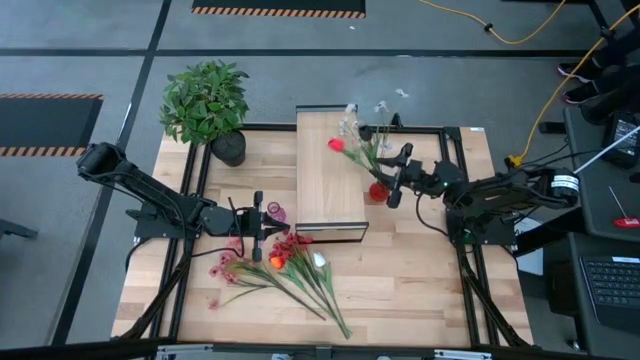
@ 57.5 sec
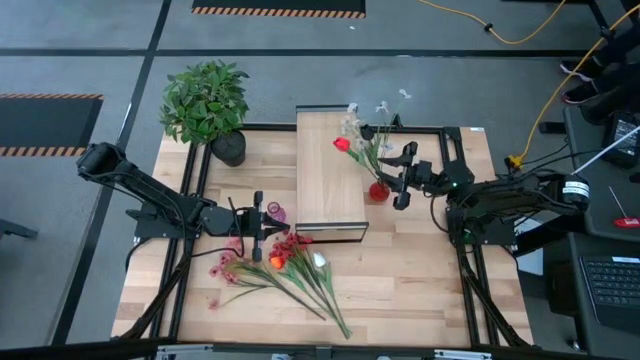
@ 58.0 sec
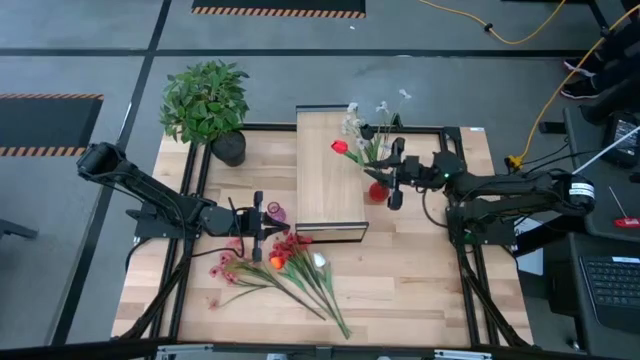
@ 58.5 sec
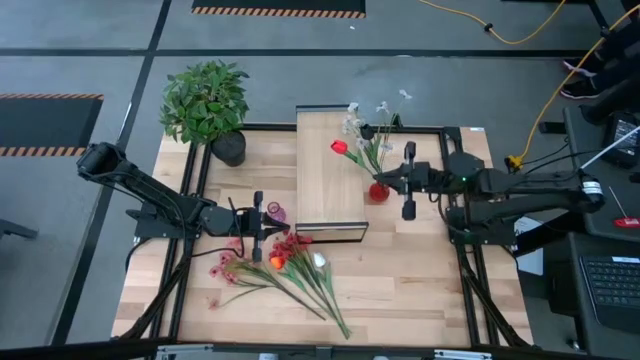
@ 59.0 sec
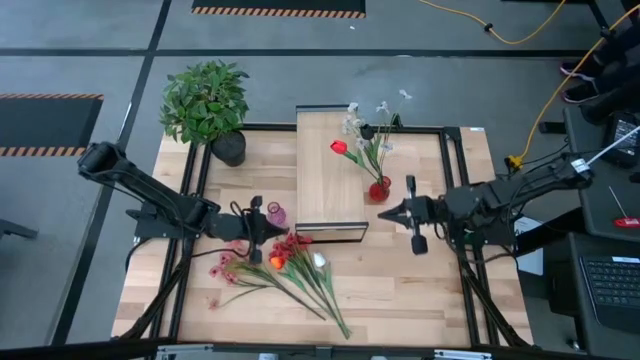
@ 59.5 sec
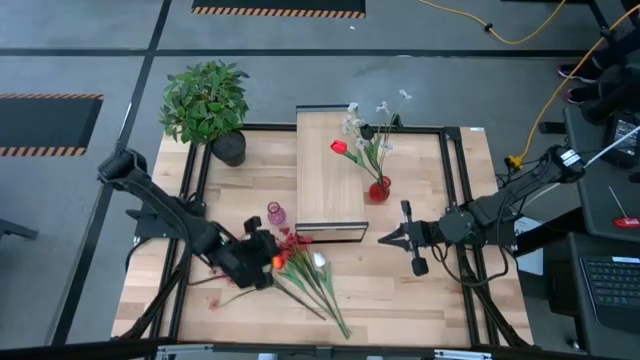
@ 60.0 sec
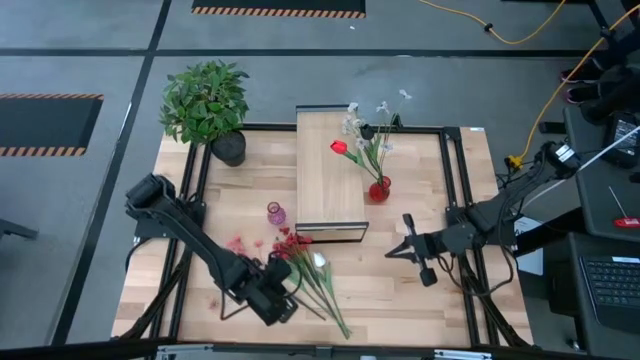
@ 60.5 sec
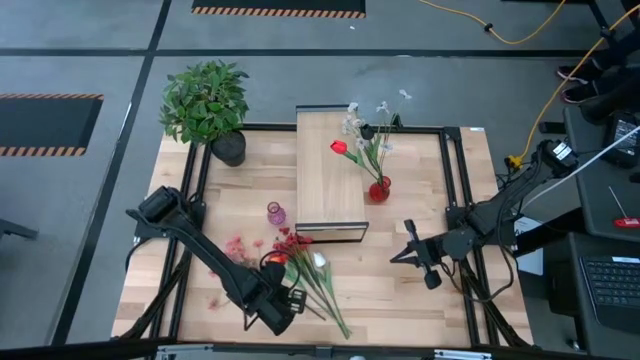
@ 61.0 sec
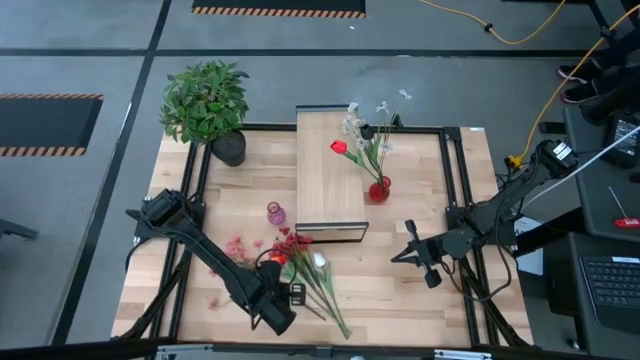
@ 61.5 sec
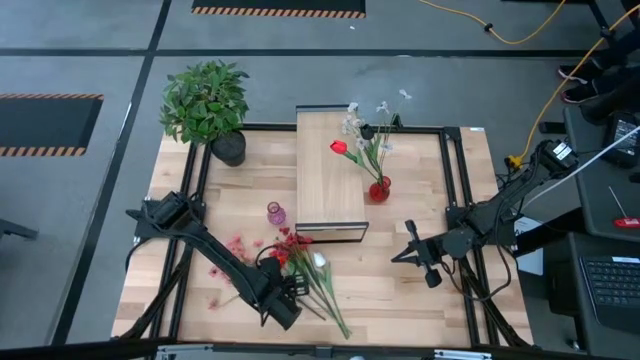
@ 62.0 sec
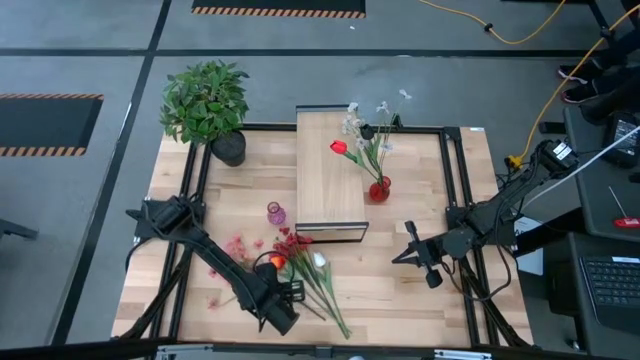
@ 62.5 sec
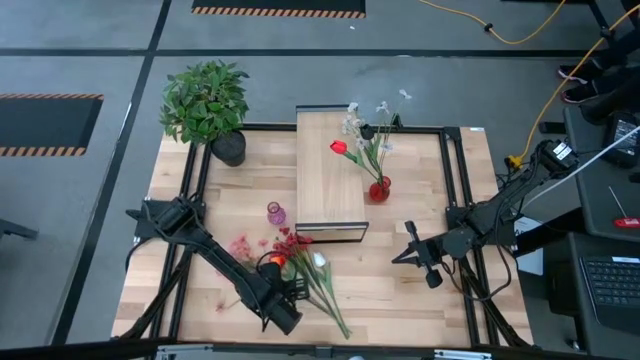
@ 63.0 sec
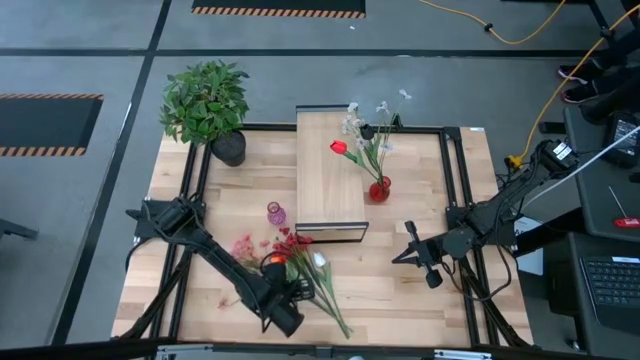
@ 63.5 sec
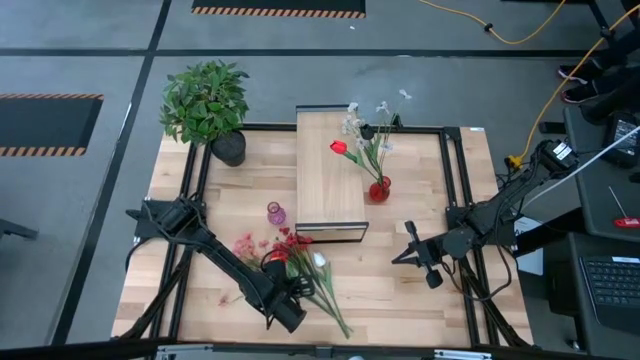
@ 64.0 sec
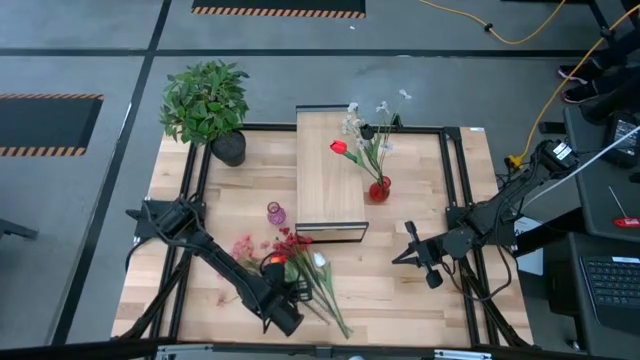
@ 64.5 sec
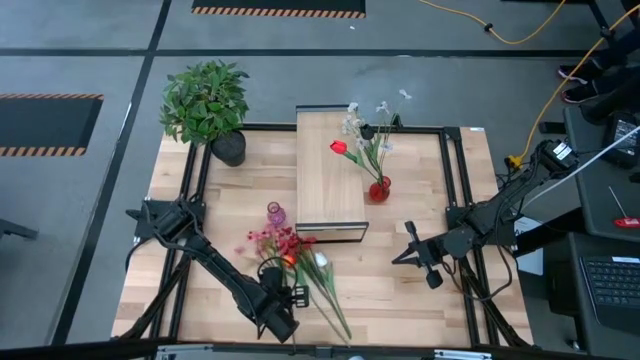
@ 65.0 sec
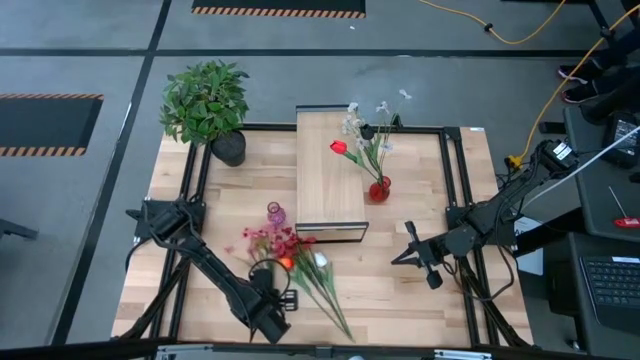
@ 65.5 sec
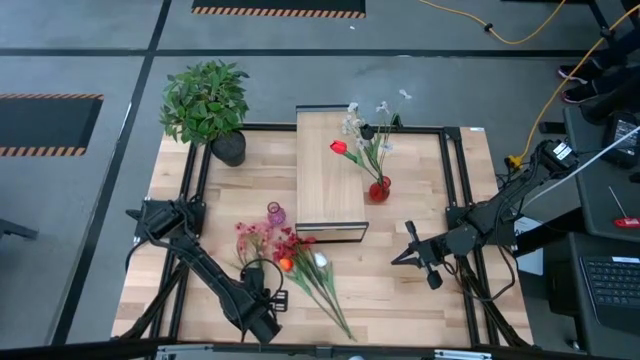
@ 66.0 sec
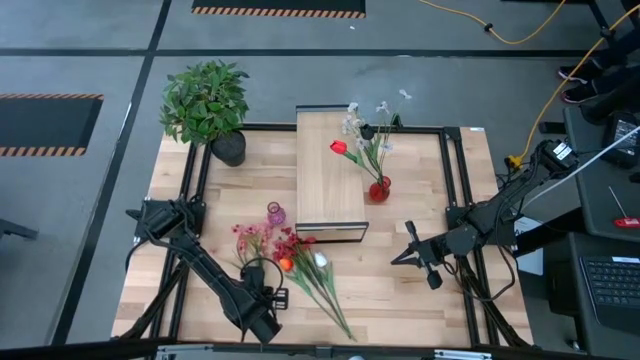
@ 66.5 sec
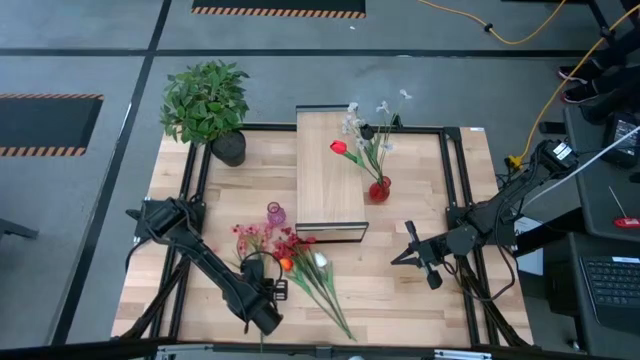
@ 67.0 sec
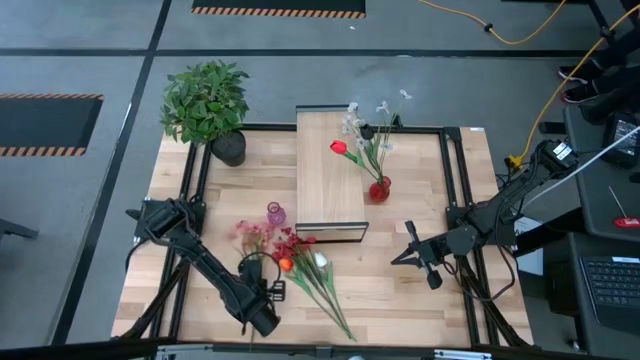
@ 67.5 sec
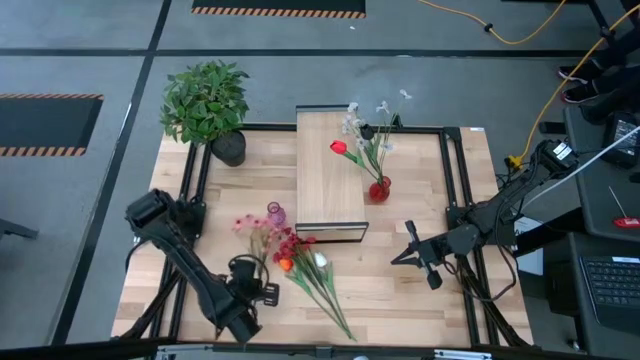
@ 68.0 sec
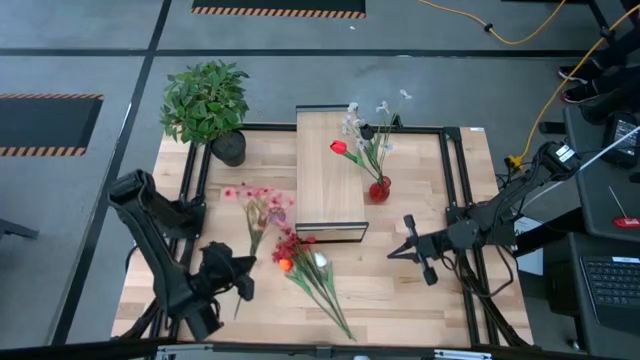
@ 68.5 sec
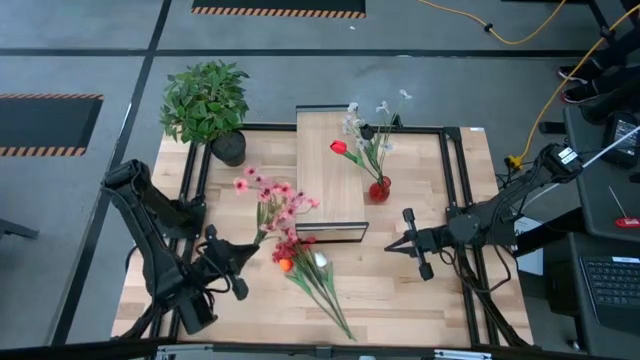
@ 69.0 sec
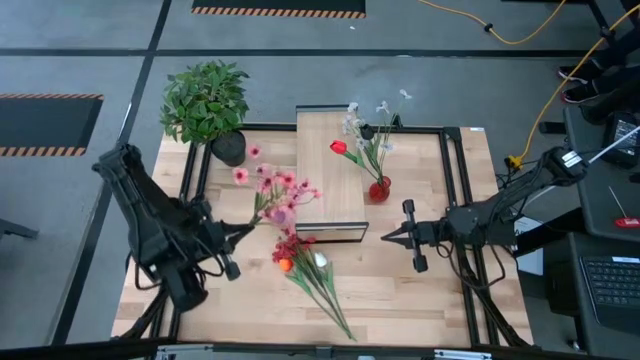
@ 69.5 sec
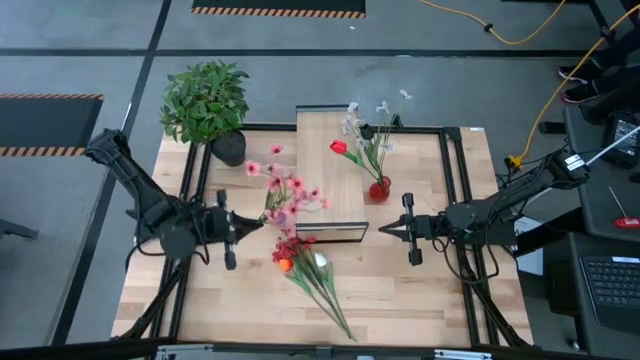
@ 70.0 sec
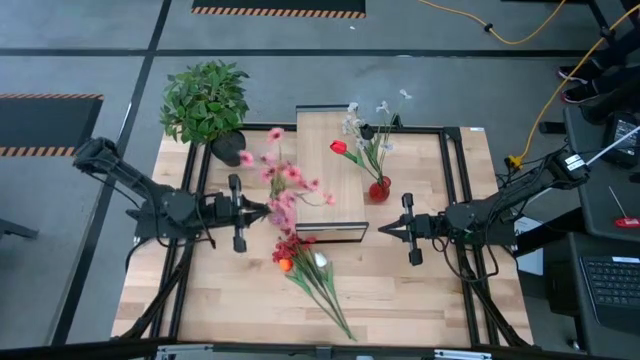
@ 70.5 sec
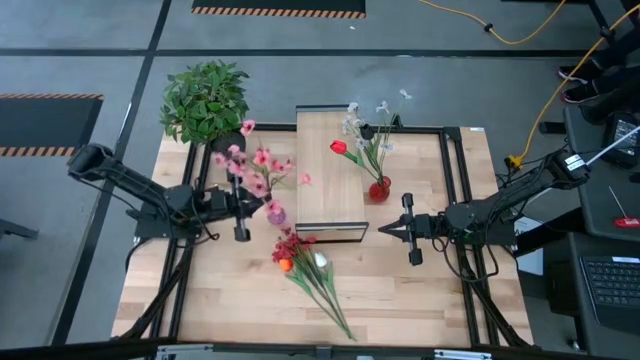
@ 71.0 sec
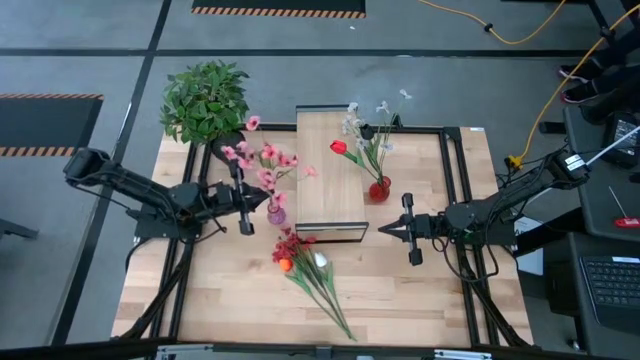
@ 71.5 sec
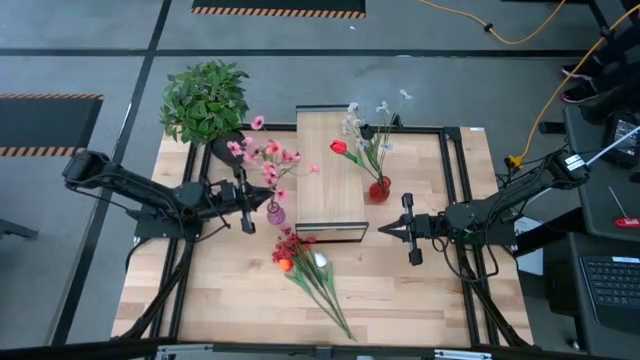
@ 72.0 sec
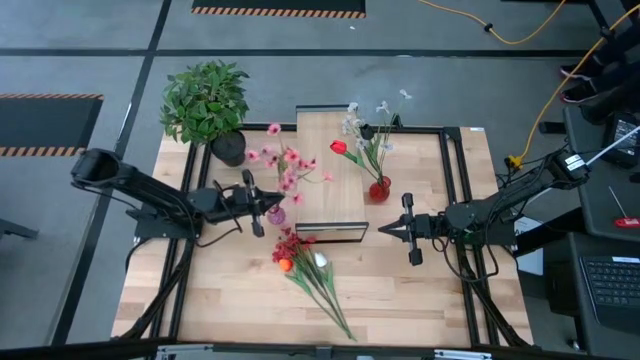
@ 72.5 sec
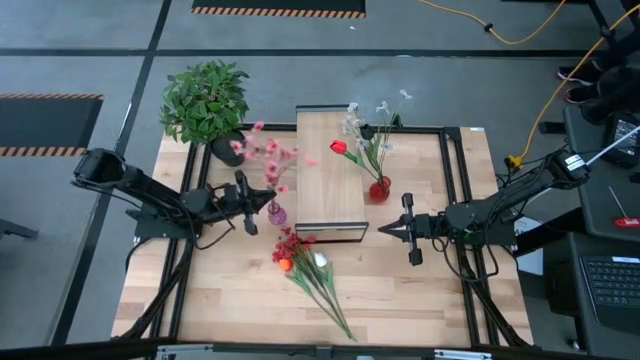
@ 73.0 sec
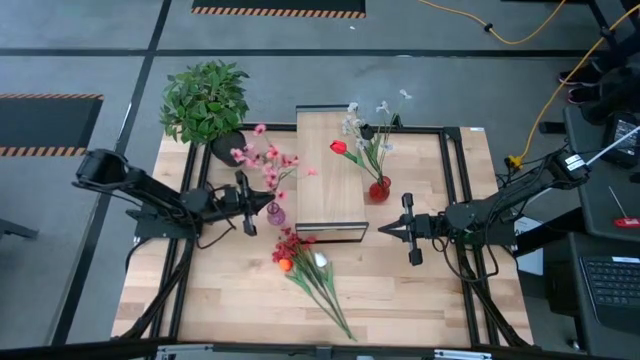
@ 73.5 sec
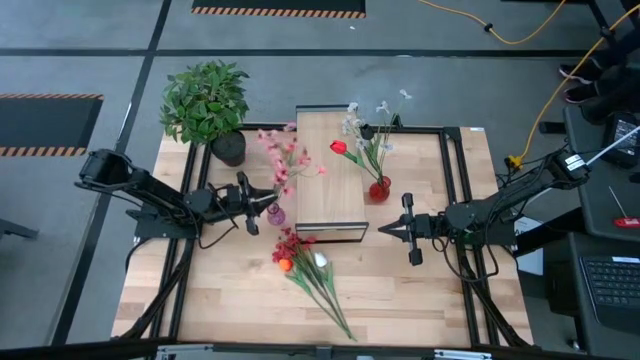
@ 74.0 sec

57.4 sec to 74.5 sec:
Task: Pick and place flowers into a vace then onto a shelf
Put the pink flowers into the violet vase

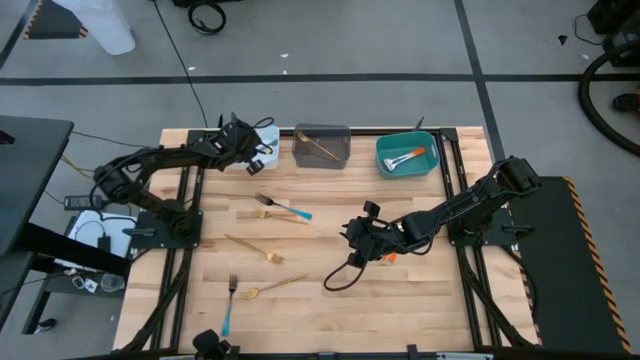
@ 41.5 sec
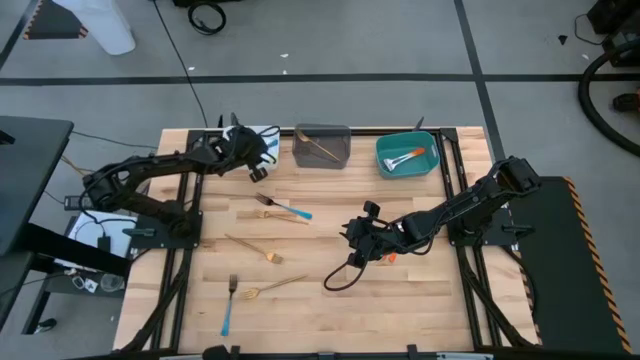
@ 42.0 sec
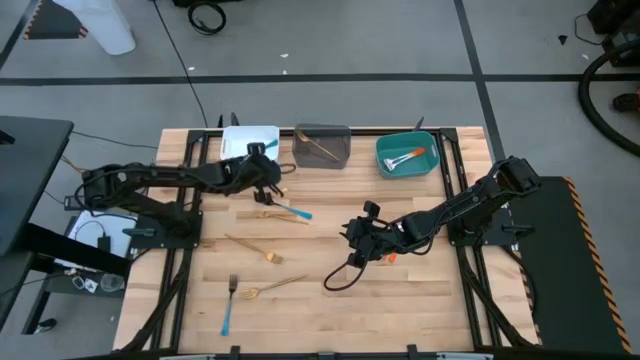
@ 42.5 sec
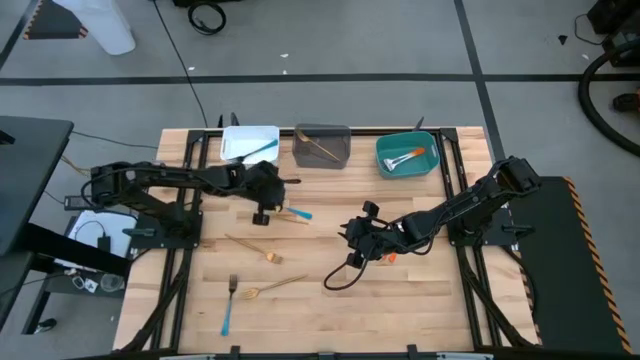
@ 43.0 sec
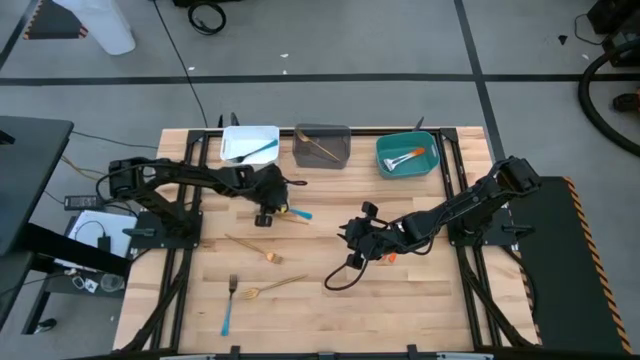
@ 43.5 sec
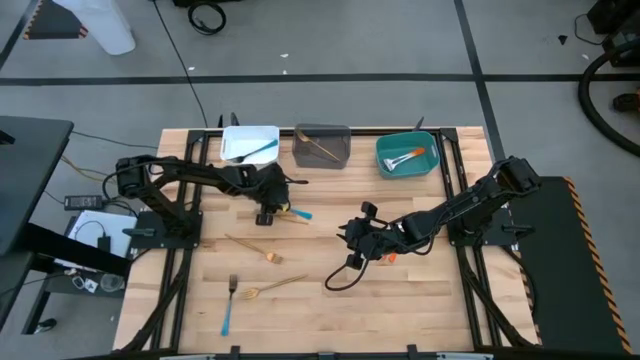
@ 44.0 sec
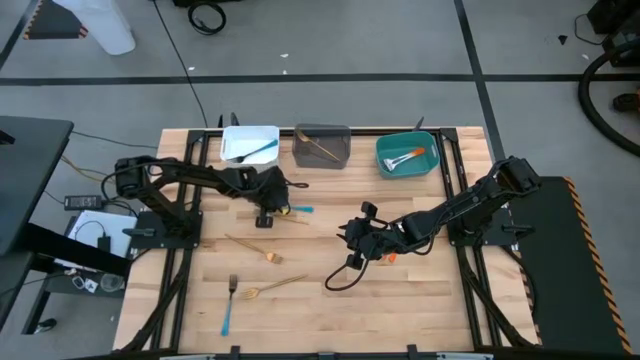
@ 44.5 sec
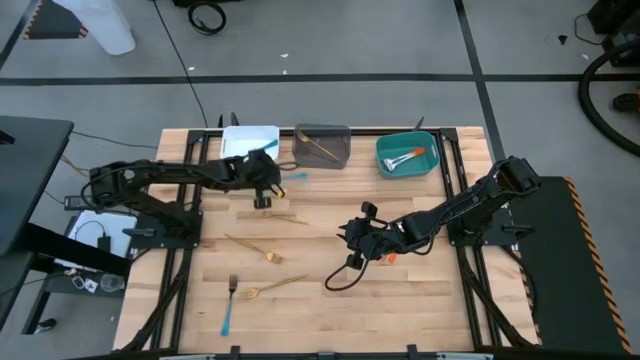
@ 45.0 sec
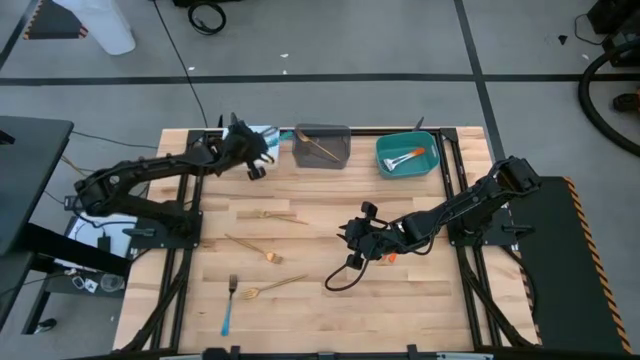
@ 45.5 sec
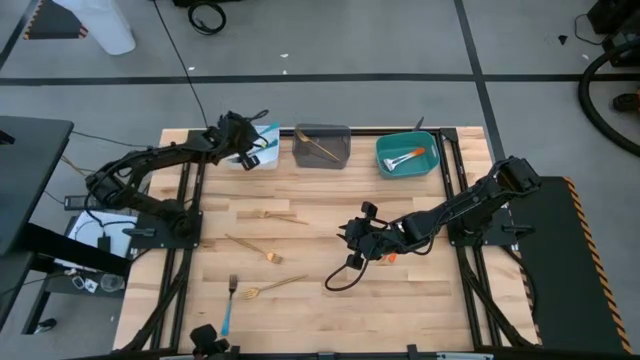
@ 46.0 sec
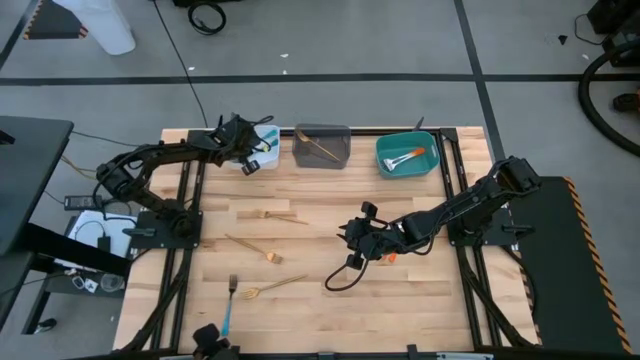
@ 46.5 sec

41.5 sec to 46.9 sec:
Task: Sort silverware by color (type)
Put the top blue fork into the white bin
